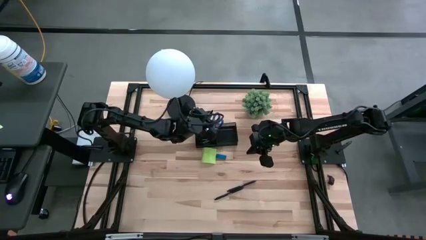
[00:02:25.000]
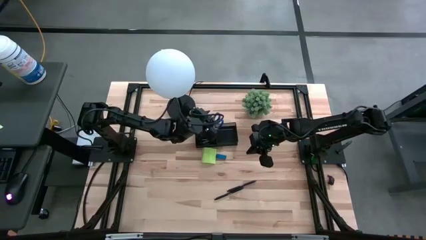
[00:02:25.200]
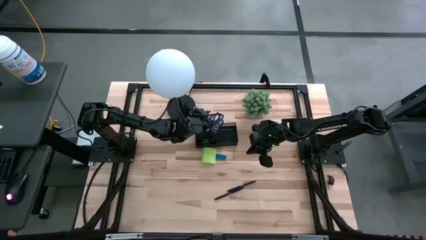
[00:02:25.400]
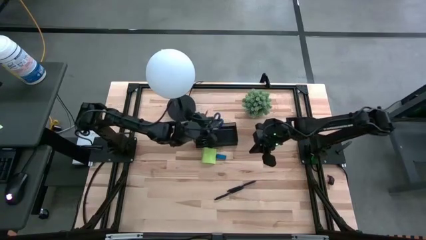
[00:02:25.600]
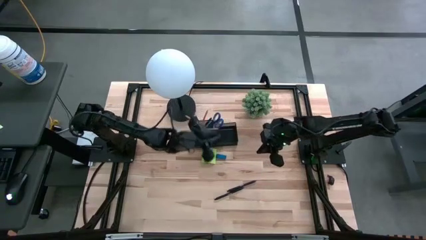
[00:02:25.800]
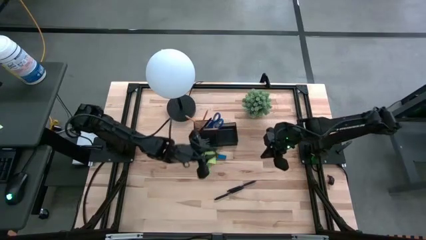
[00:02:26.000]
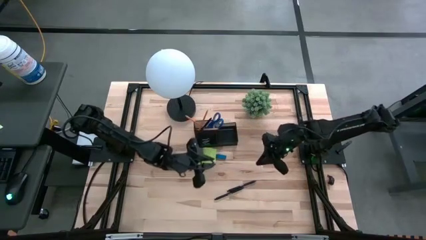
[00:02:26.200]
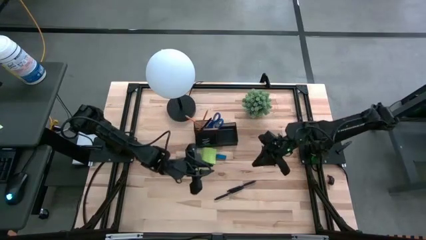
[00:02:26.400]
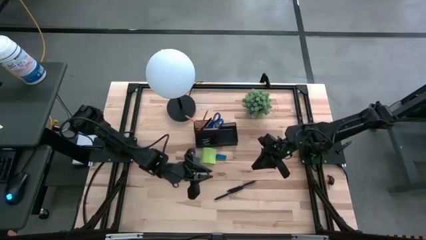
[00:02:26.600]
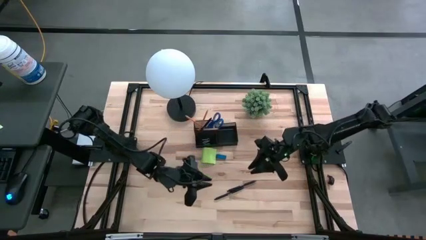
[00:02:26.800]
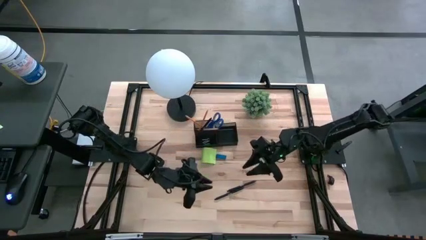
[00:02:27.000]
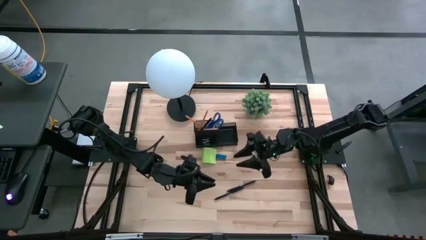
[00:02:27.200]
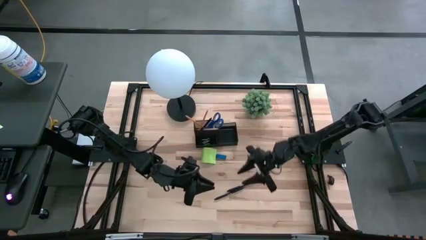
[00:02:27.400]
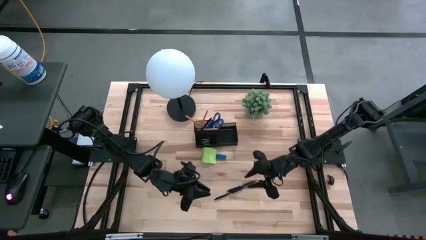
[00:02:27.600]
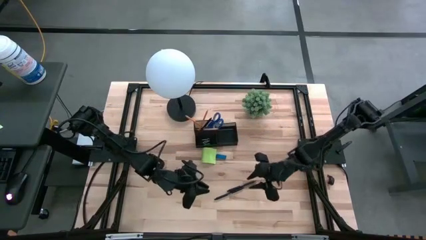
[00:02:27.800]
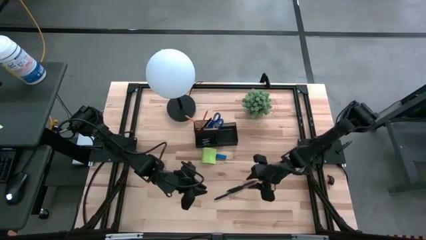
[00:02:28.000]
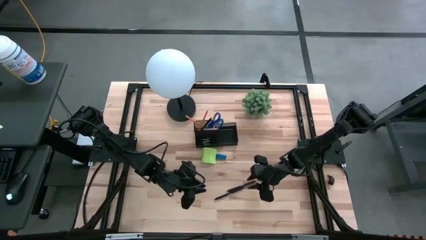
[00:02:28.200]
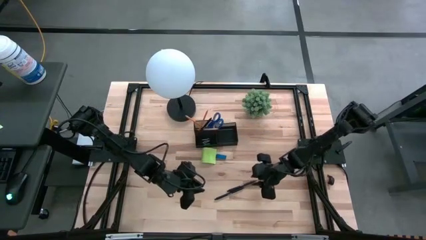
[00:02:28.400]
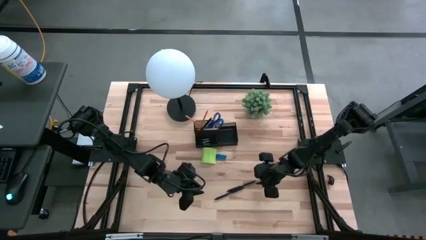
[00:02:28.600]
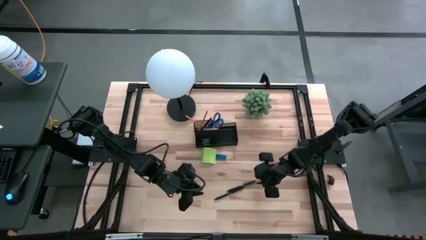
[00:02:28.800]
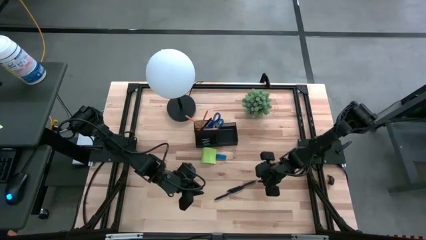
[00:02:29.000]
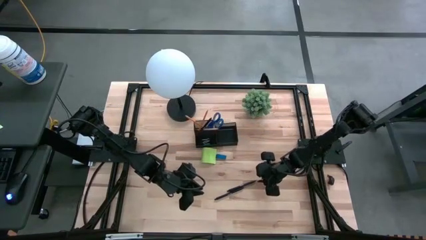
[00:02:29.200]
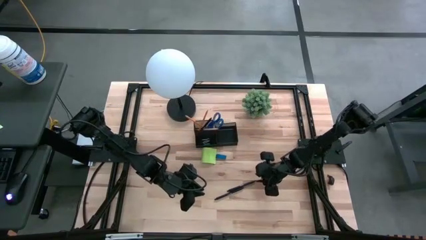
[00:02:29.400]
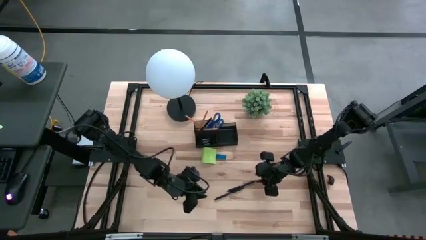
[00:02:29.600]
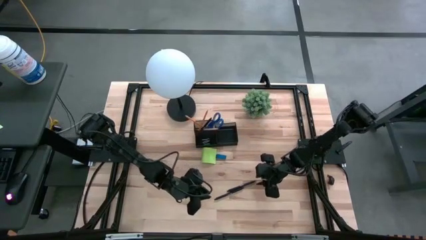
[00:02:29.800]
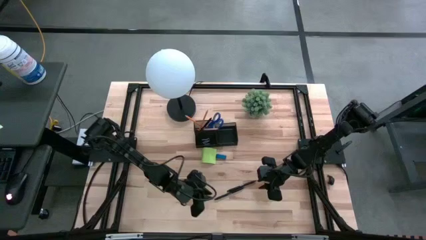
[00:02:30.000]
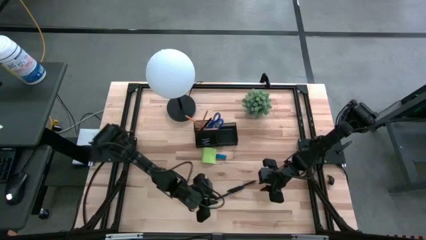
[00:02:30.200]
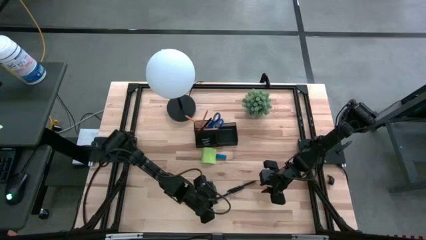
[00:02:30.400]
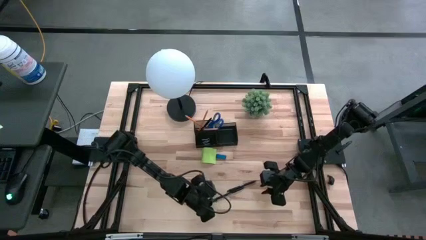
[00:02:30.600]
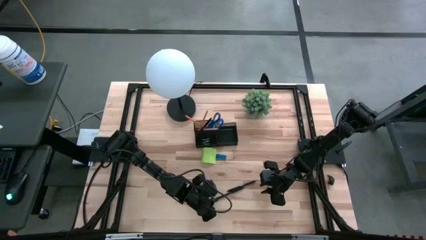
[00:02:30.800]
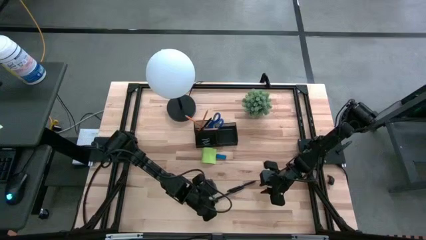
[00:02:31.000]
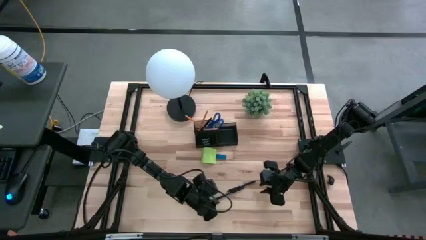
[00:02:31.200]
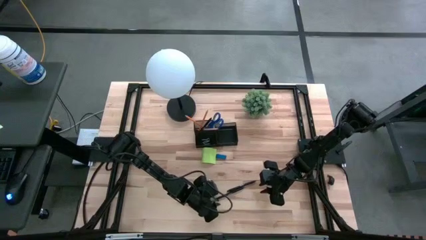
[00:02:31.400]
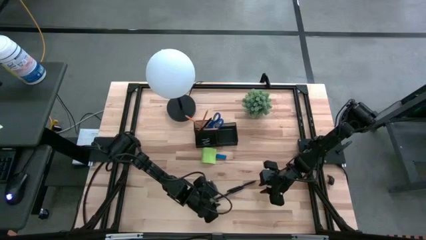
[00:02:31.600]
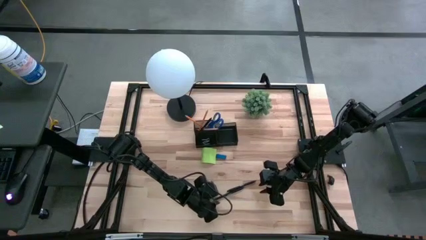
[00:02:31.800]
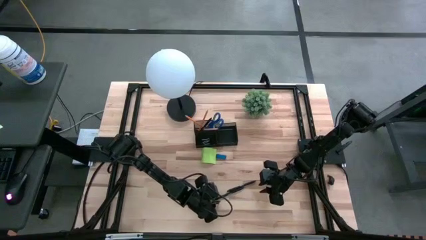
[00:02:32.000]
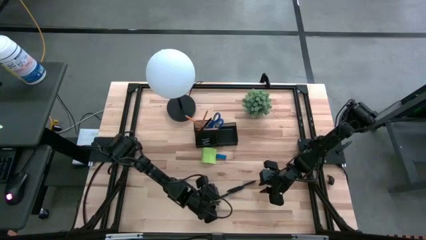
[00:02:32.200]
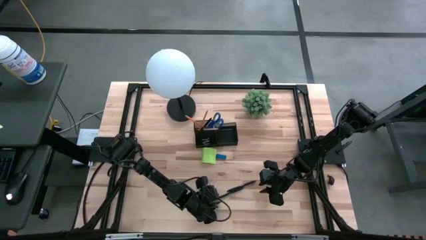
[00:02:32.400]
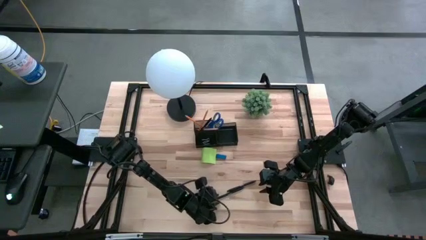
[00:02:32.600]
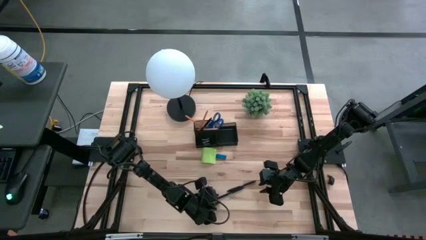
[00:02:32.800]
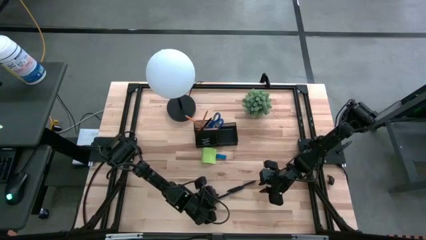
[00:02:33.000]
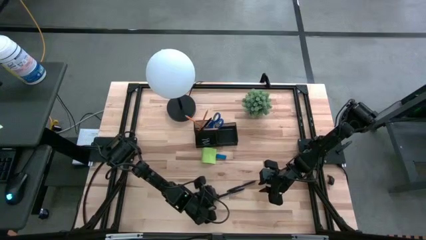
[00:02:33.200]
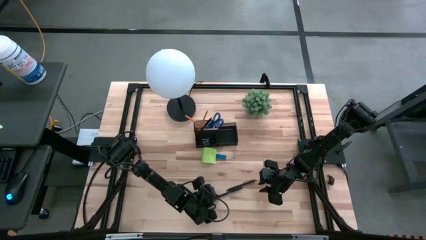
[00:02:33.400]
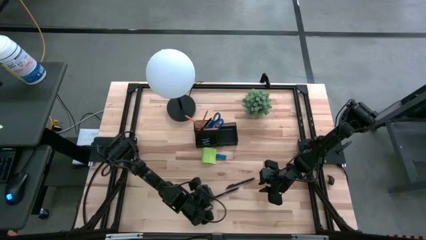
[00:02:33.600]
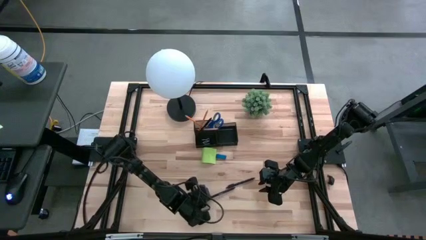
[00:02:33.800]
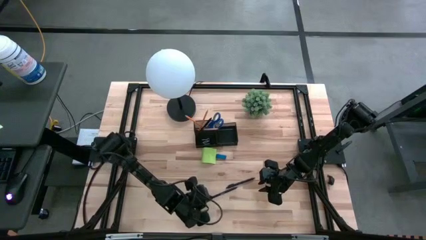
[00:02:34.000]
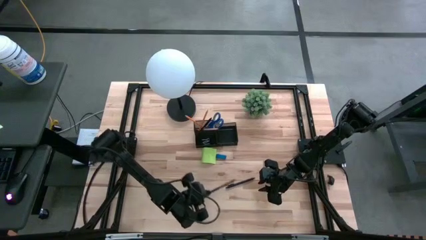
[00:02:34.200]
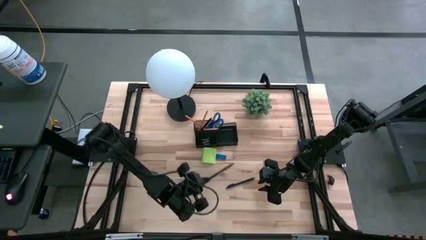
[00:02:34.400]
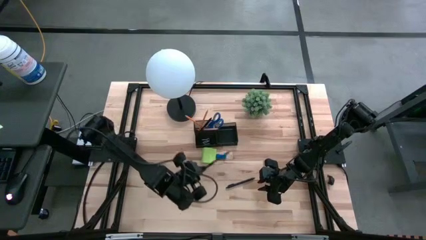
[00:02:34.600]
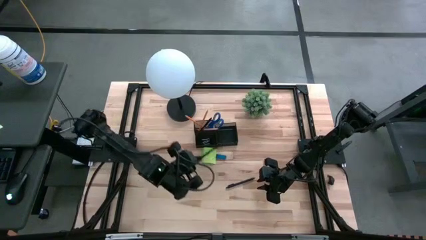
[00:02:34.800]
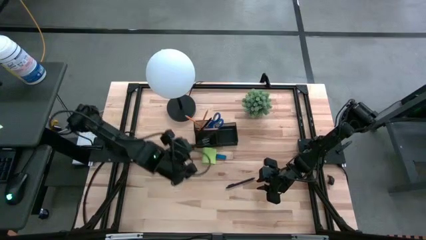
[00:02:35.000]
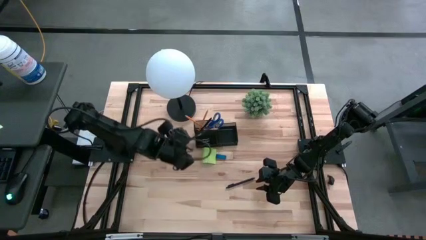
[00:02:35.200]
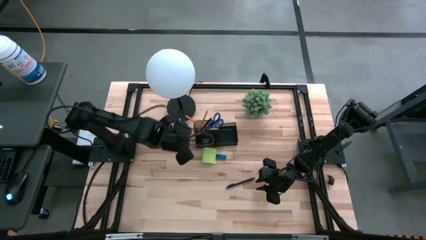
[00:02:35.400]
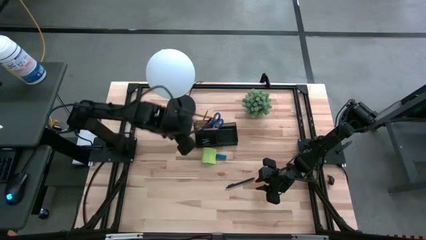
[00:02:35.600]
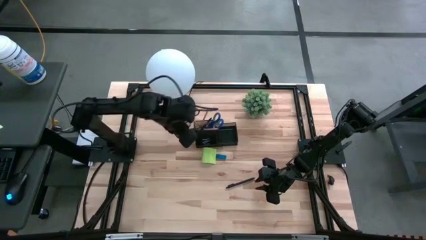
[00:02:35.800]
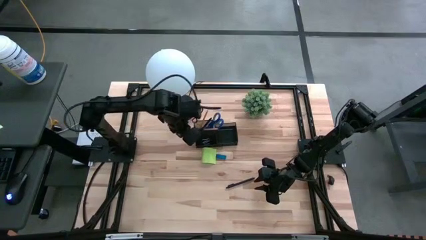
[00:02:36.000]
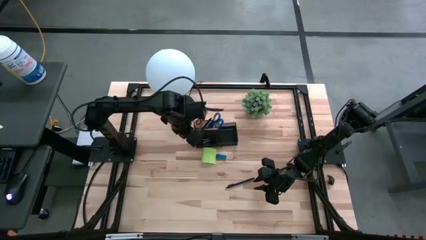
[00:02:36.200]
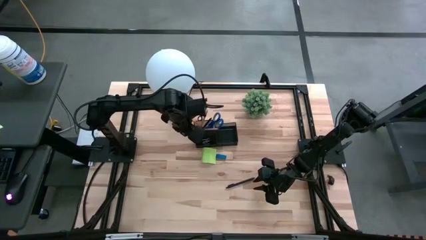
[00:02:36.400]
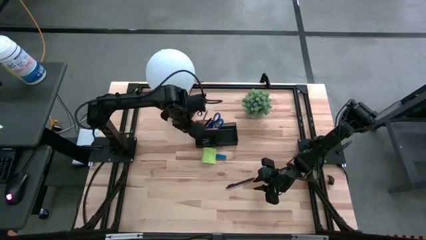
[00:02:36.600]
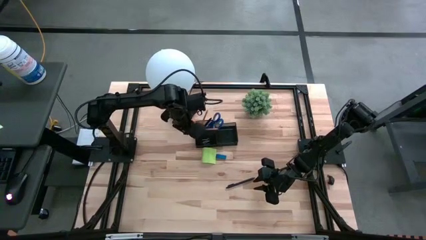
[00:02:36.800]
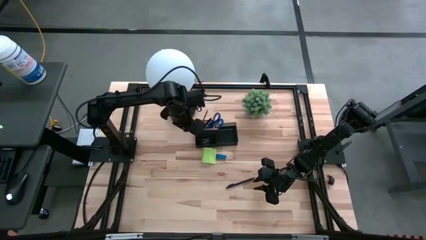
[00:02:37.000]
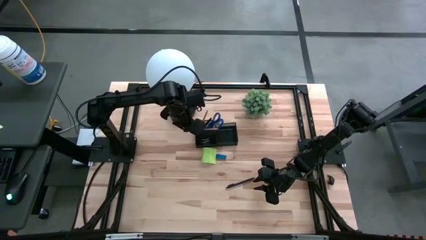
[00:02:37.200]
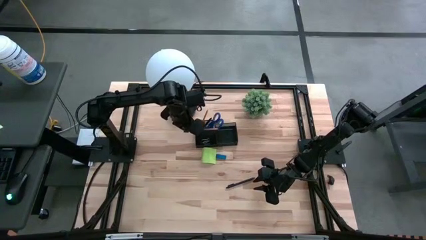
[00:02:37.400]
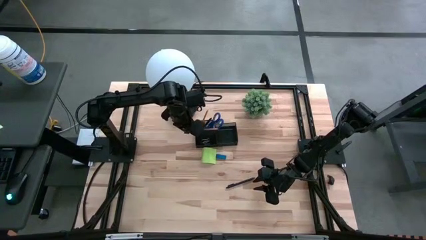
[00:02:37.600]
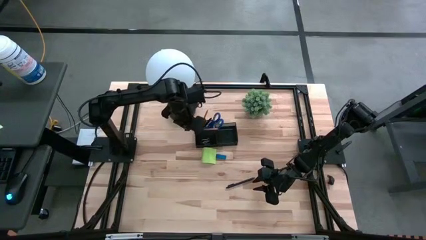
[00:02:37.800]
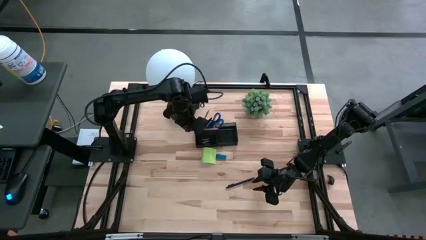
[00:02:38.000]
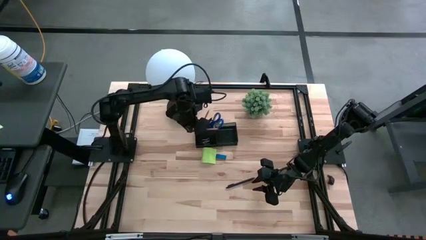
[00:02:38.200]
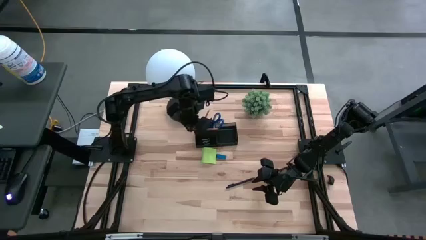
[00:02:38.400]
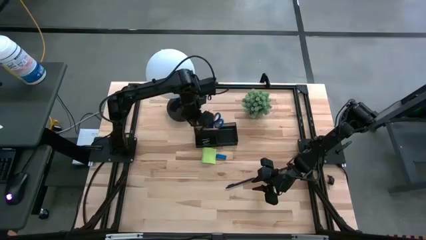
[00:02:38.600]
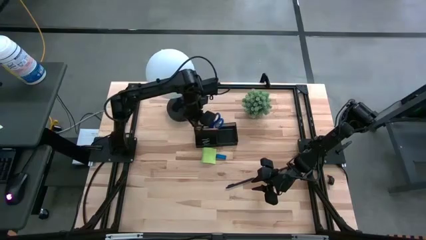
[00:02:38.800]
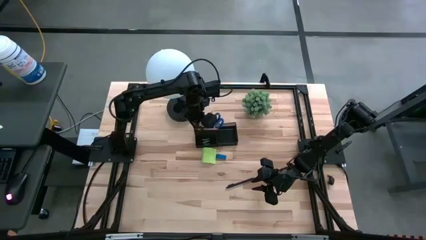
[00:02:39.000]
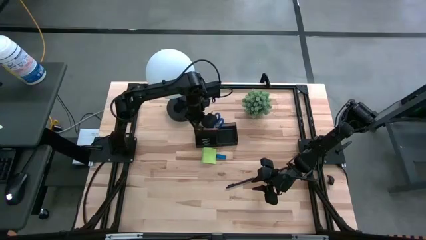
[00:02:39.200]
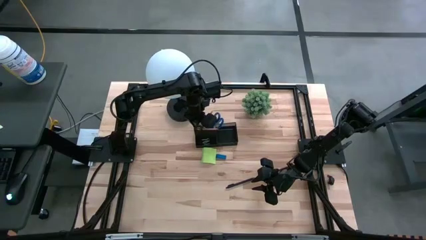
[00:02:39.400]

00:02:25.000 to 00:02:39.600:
Task: Pick and place office supplies into organizer
Put the bottom black pen into the top left side of the desk organizer
